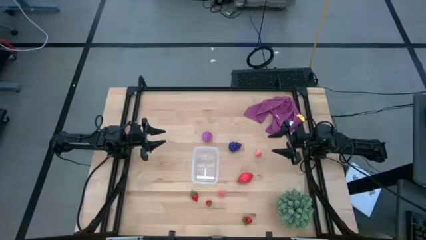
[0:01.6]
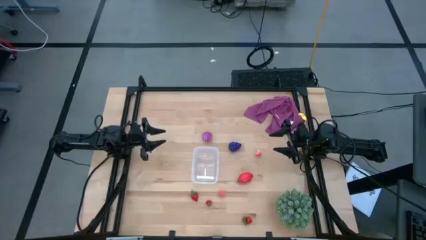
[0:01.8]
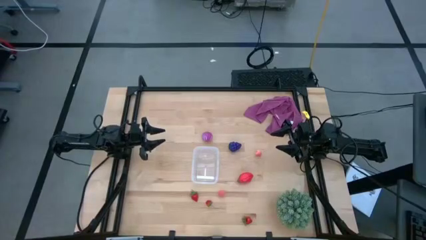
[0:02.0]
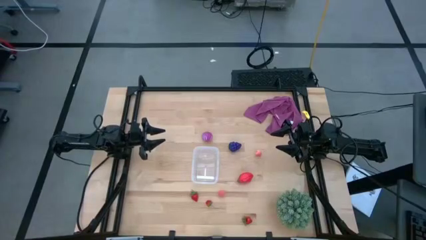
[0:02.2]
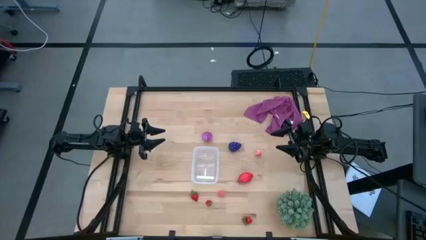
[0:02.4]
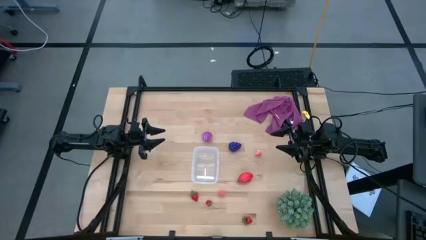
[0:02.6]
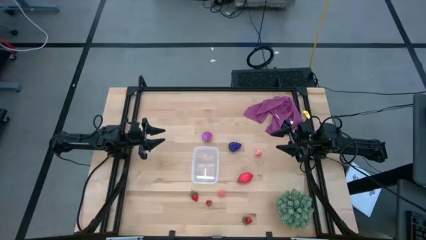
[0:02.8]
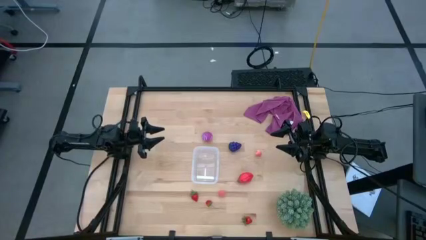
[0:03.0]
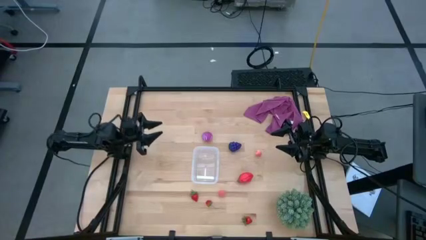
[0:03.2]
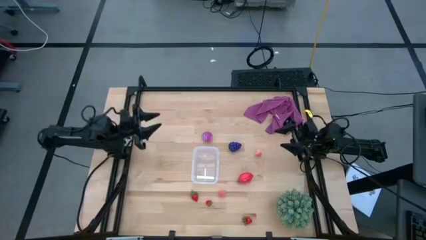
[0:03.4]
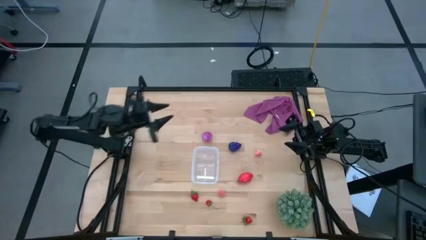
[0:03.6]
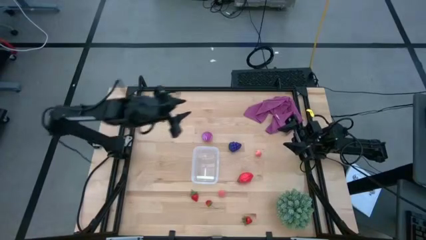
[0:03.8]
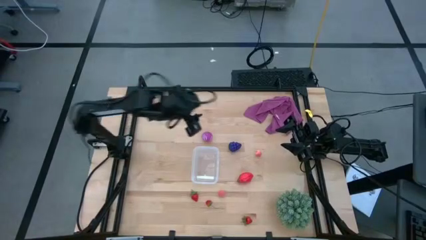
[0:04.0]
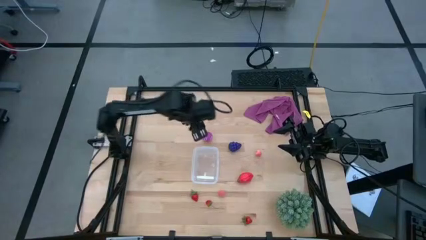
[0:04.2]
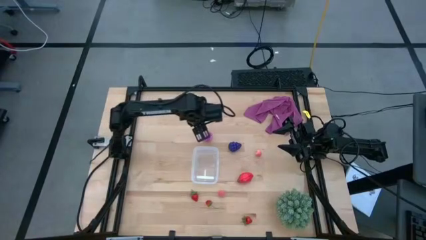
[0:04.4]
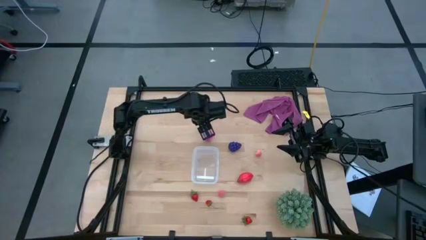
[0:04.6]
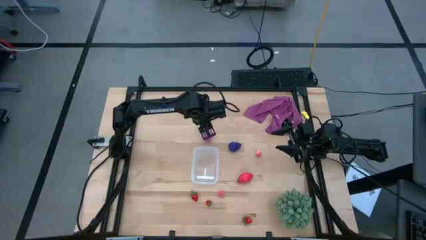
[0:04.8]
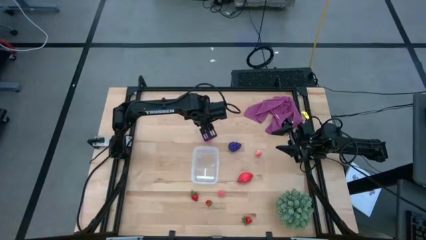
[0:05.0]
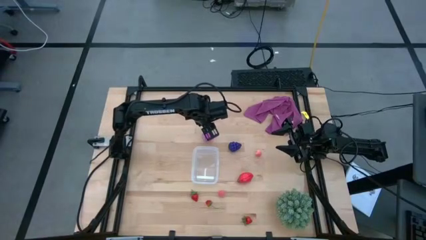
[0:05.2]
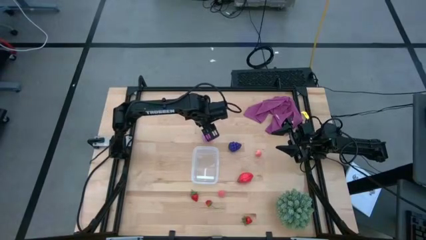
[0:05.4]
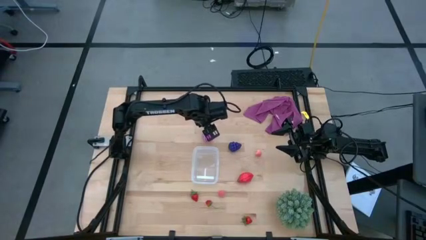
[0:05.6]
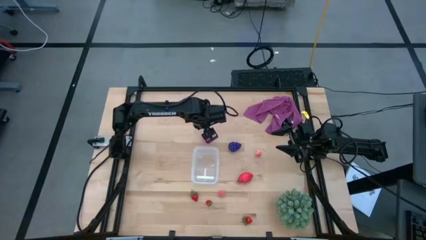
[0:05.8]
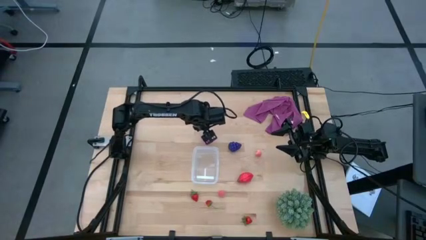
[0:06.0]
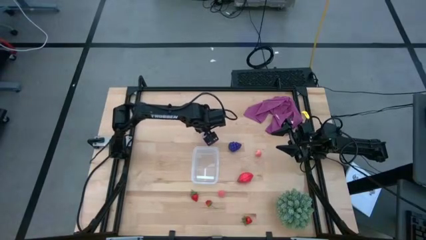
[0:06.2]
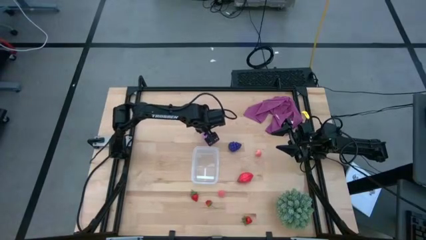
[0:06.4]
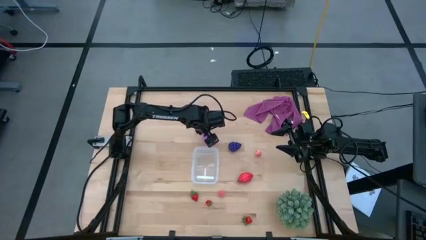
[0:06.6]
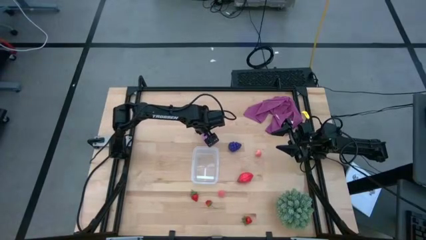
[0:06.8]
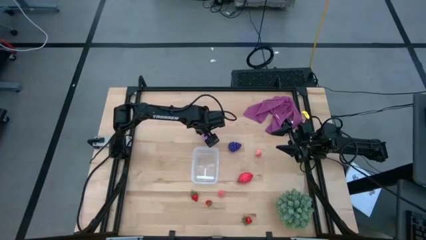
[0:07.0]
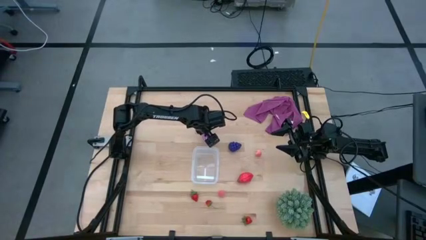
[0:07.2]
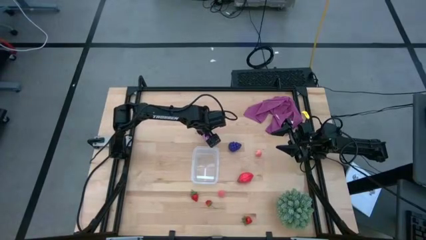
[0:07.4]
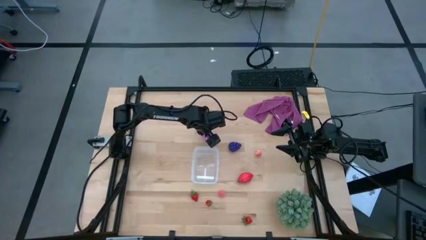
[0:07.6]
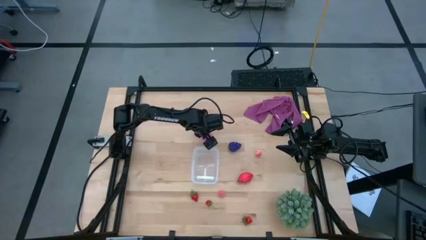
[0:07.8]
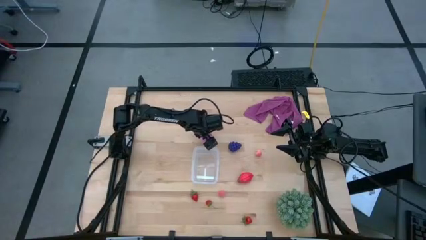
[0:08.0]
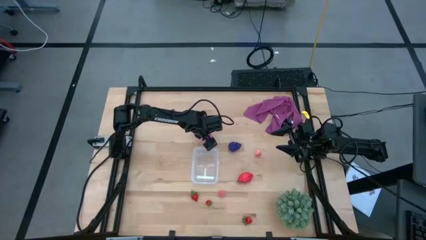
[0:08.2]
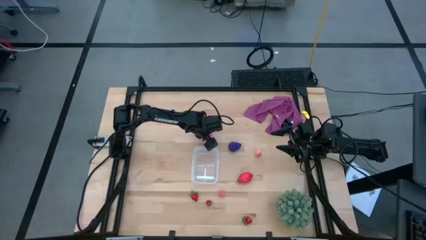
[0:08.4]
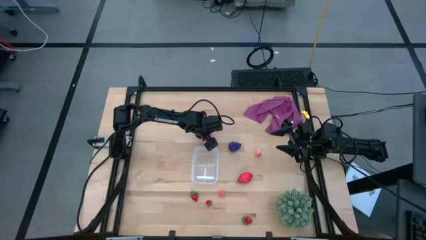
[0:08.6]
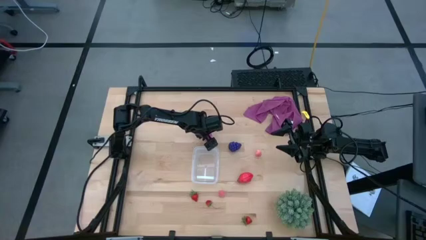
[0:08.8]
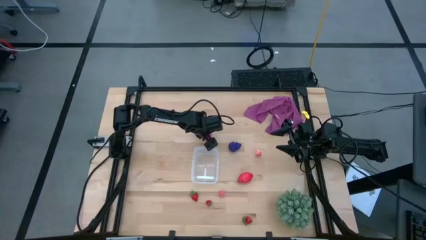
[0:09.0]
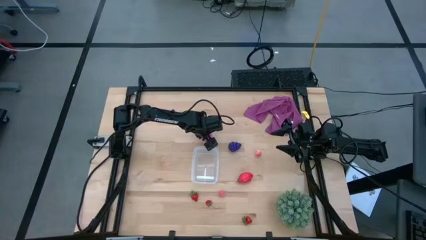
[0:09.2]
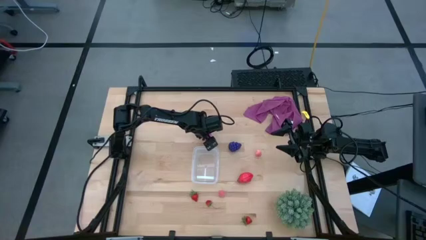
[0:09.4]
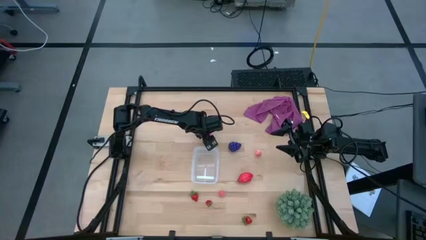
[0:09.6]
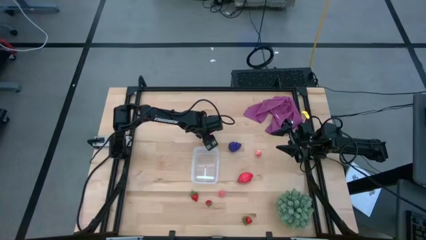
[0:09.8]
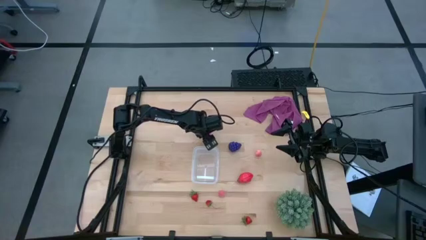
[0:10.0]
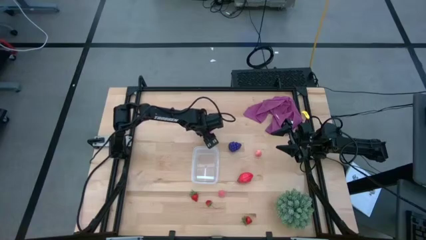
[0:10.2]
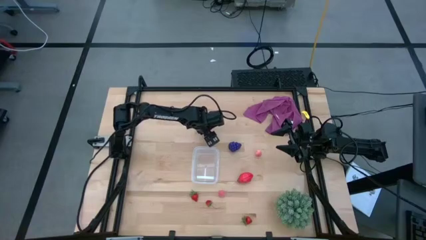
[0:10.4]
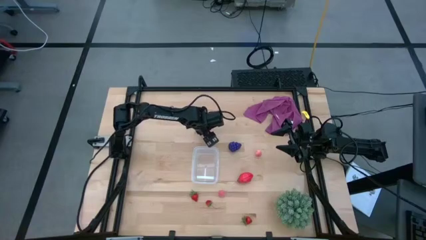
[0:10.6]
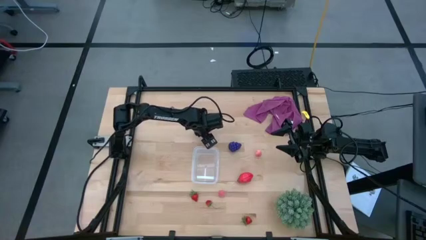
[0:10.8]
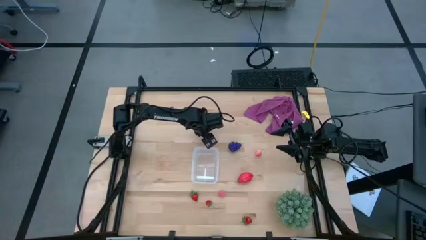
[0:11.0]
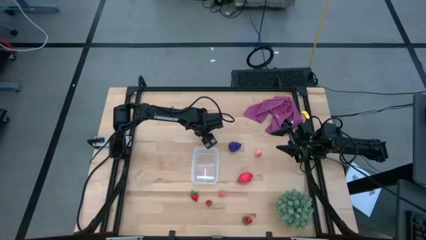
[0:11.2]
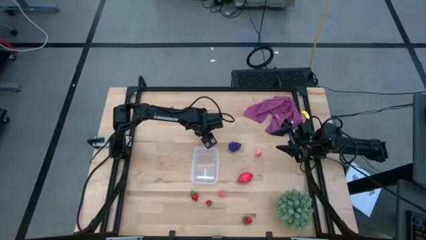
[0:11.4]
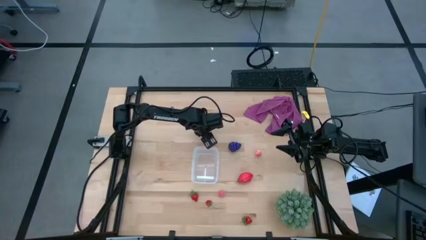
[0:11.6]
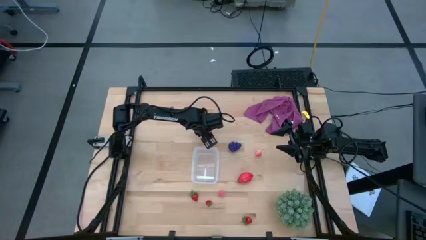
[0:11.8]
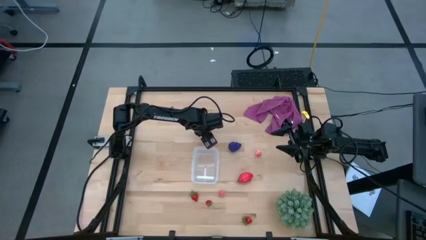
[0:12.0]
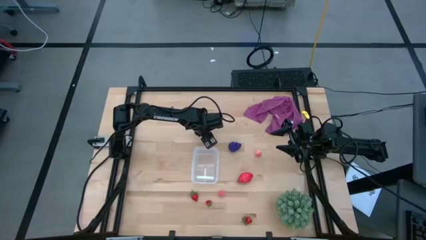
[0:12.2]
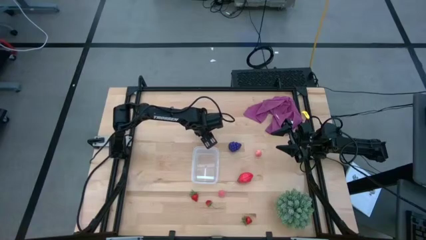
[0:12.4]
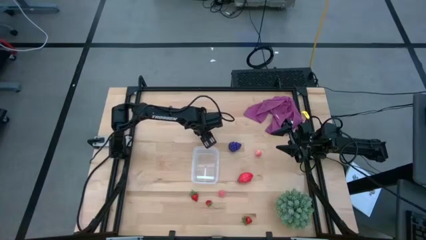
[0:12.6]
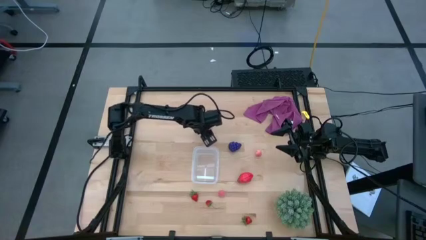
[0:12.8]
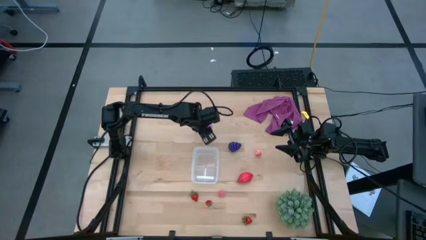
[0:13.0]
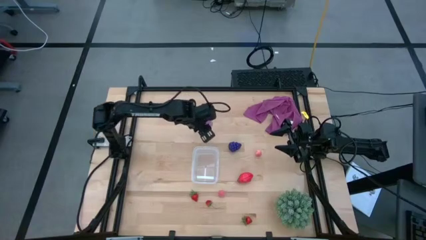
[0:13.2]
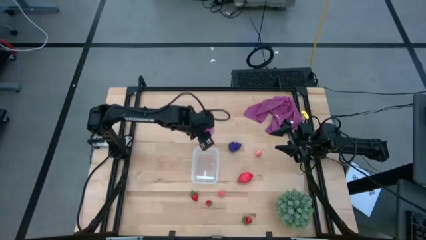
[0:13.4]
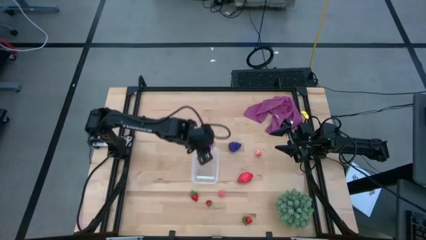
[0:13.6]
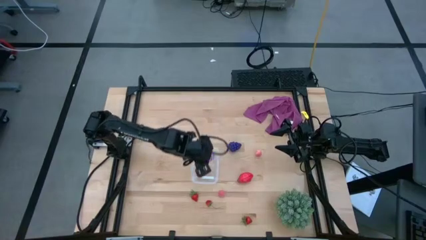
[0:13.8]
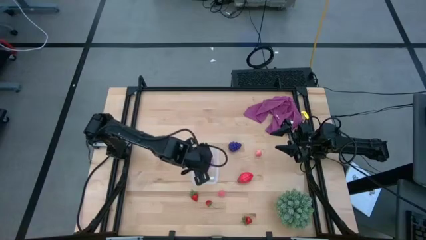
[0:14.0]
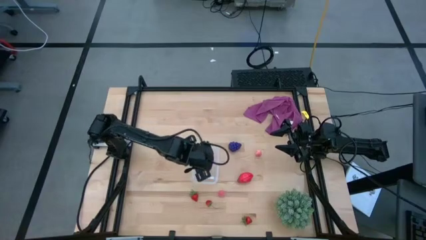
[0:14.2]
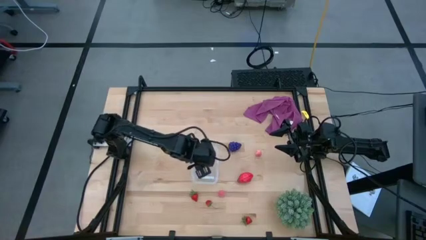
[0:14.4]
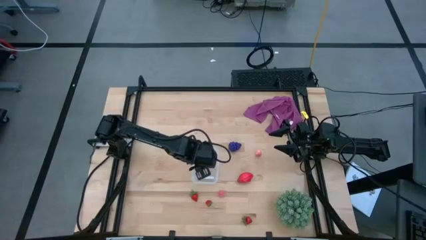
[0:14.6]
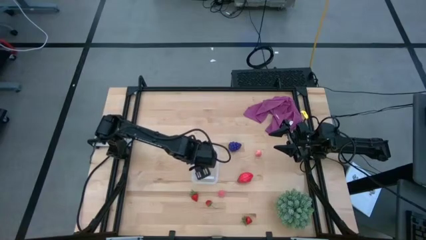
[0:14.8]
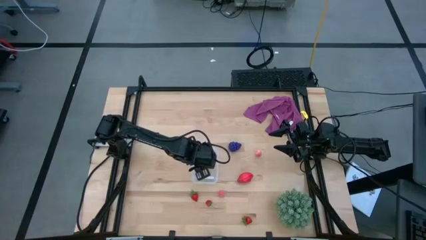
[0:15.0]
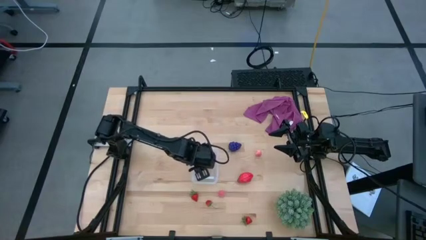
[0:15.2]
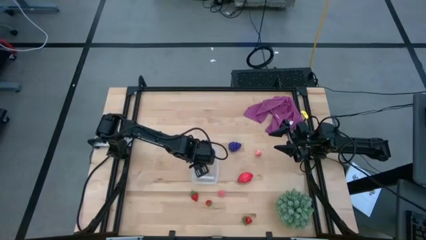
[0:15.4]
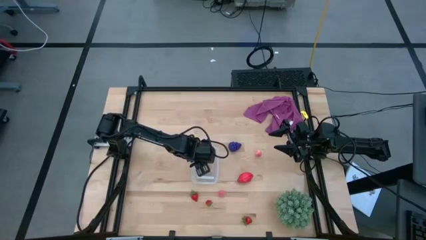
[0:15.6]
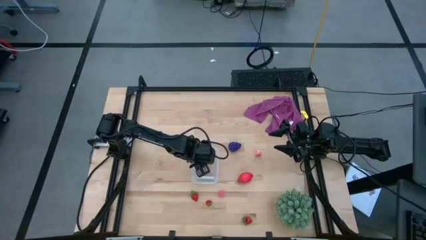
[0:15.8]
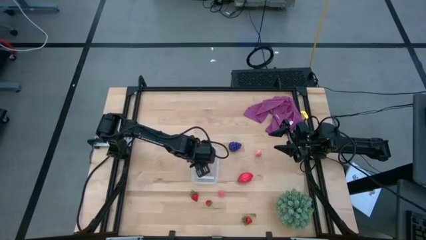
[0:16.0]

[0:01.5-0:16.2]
Task: Pick and placing Produce into tupperware
Put the purple onion into the transparent bin
